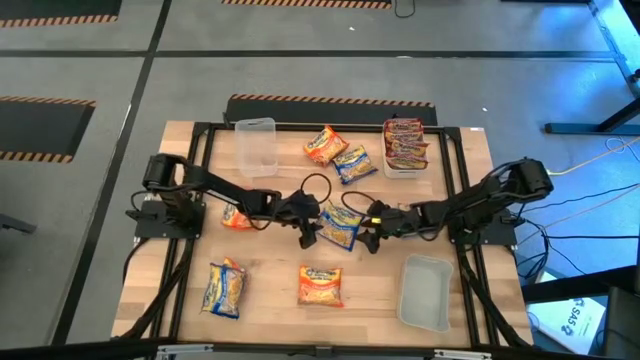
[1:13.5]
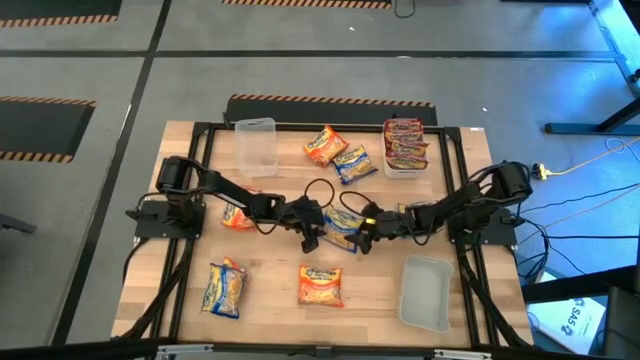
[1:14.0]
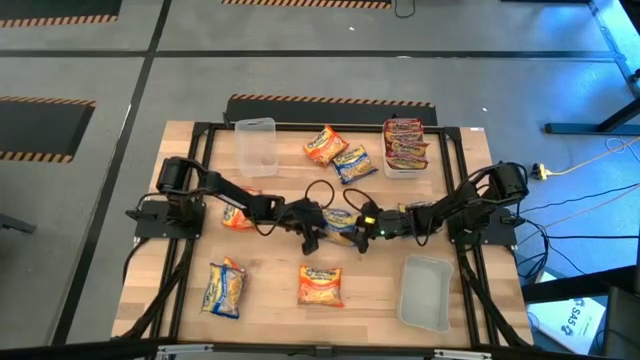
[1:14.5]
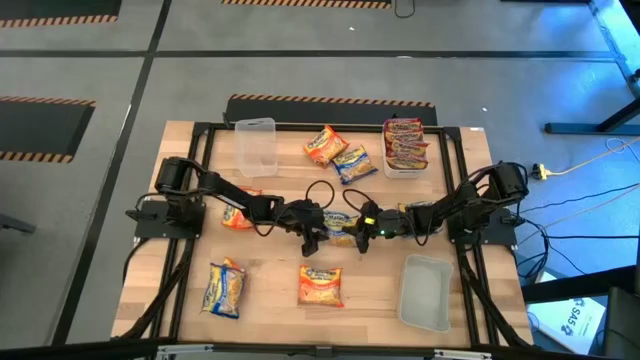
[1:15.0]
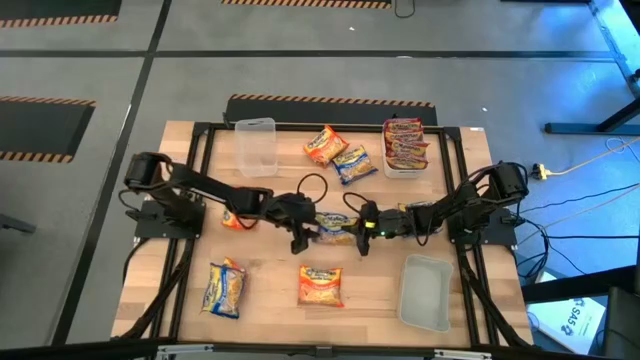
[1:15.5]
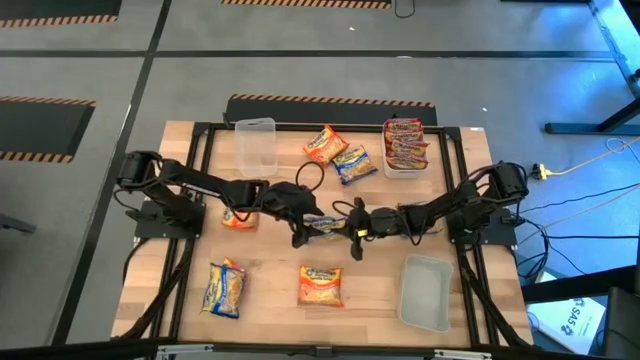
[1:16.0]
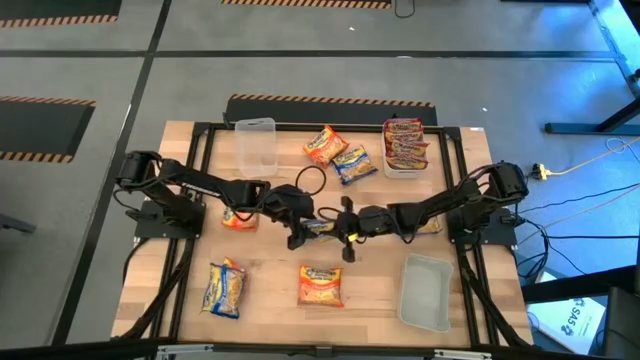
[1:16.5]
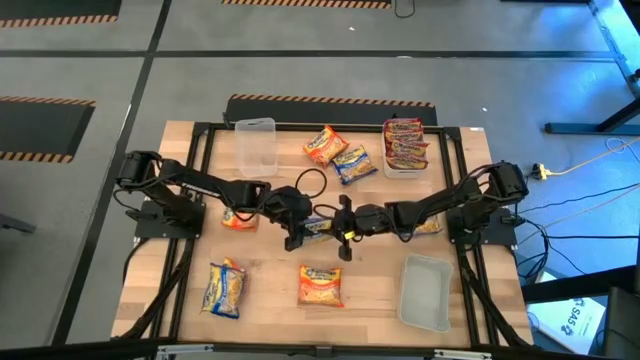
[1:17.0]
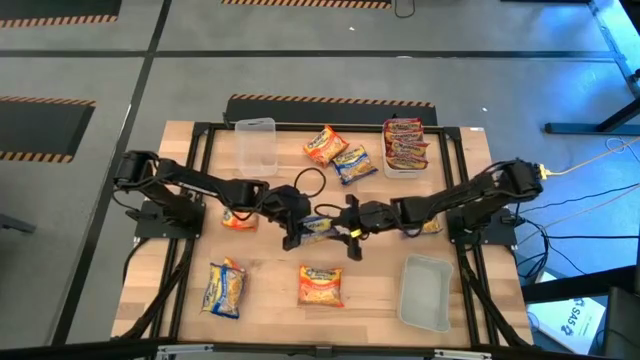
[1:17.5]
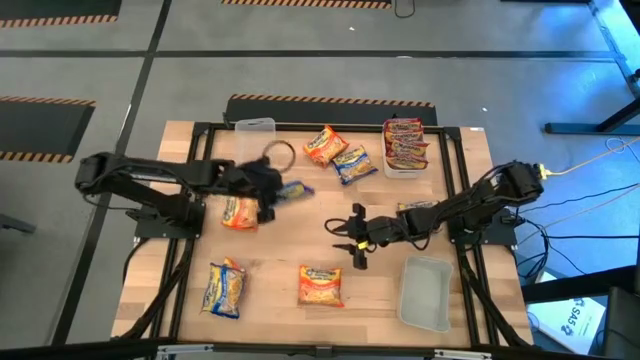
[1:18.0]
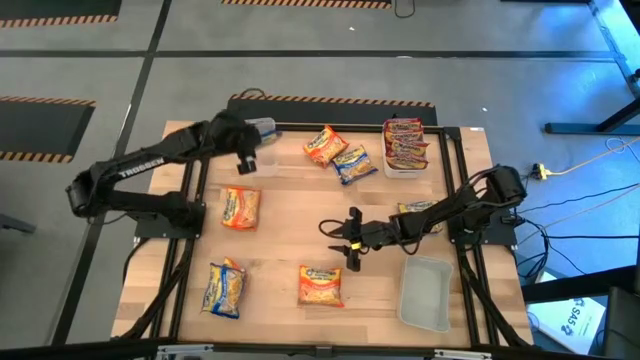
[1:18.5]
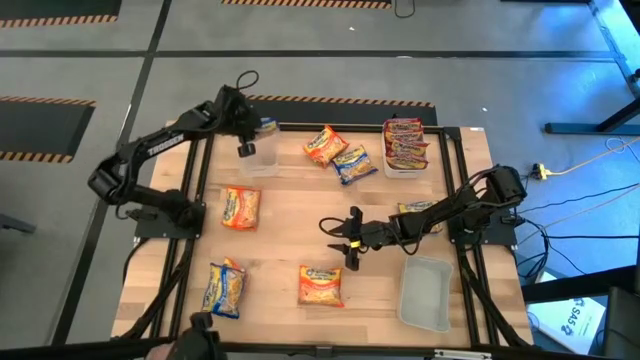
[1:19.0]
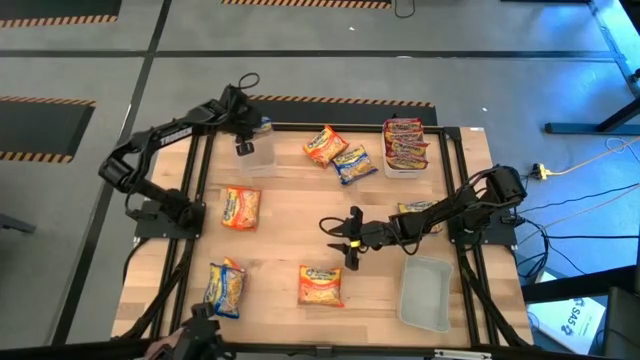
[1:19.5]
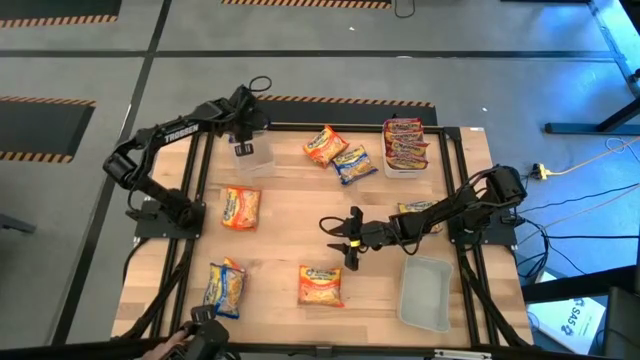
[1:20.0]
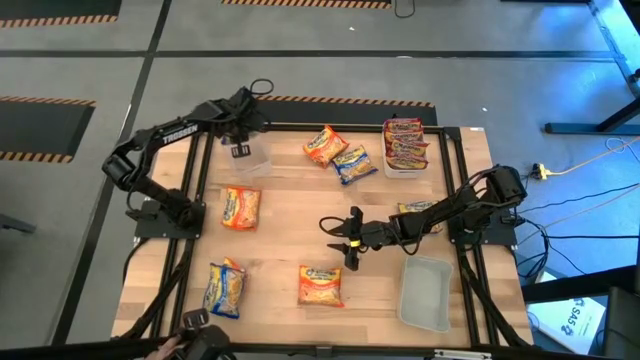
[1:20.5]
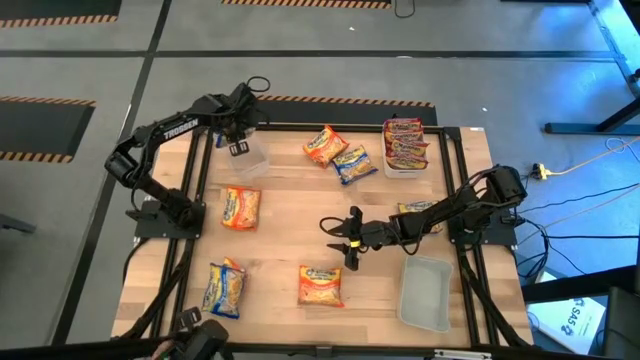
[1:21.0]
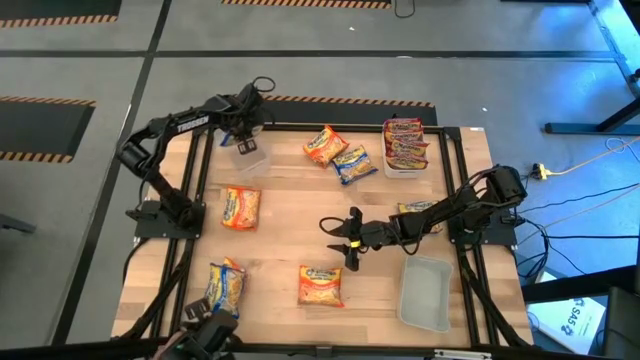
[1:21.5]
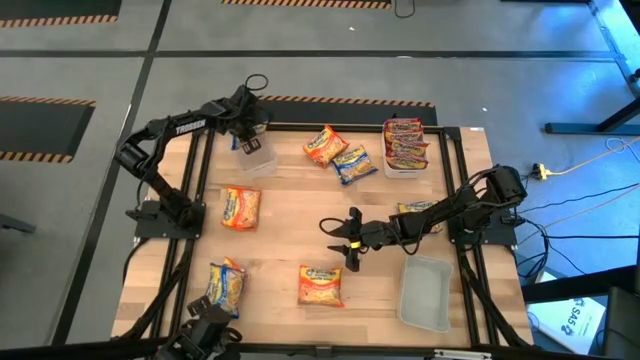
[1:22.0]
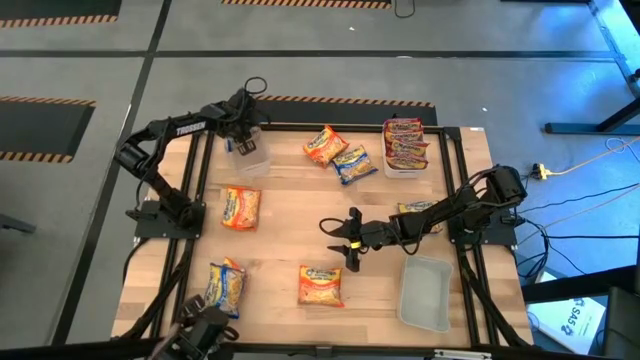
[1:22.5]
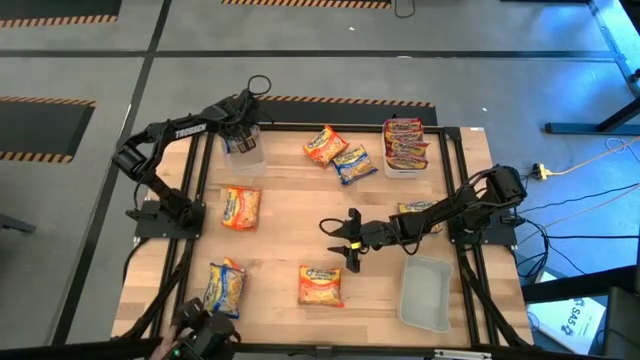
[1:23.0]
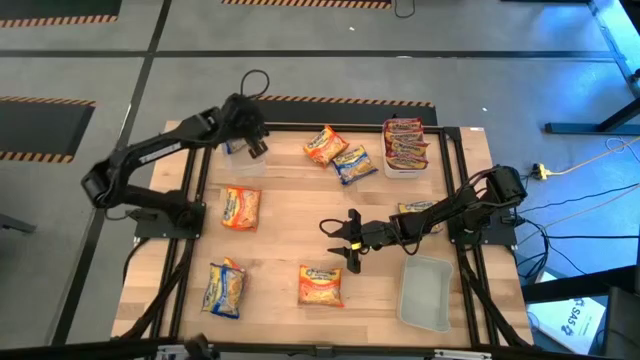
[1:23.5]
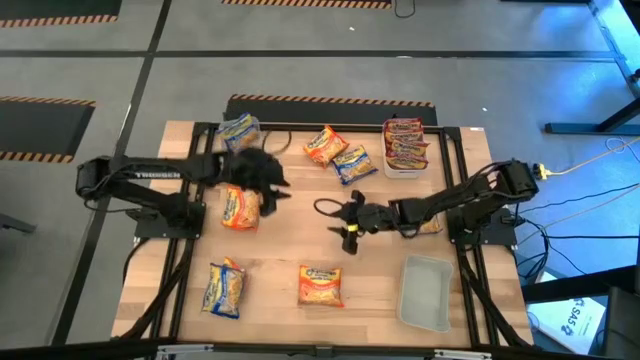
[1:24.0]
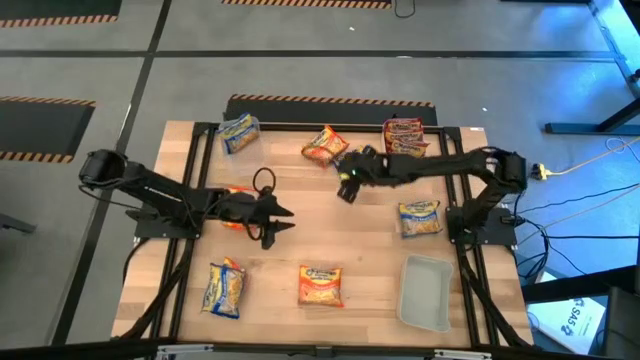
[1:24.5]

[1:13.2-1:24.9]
Task: Sort Maruchan noodles
Put the center left blue noodle pack into the transparent bin

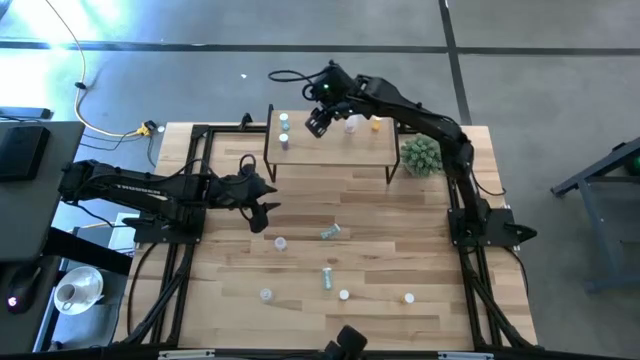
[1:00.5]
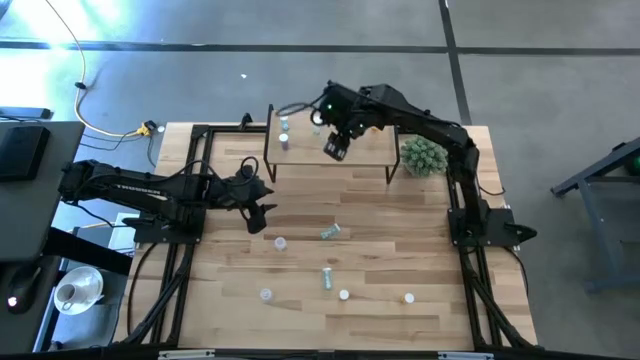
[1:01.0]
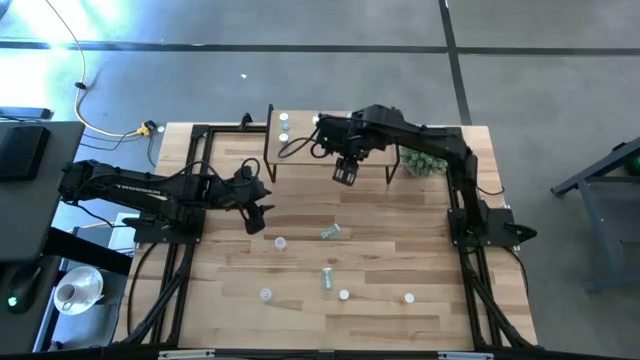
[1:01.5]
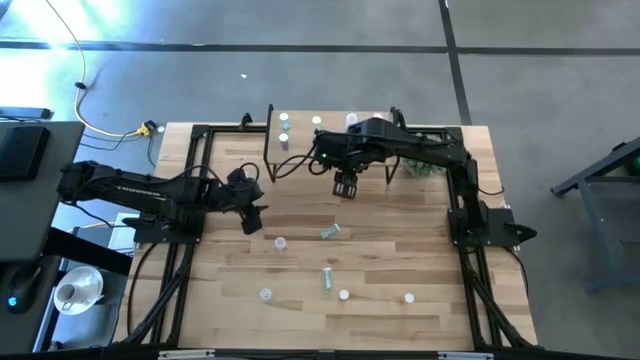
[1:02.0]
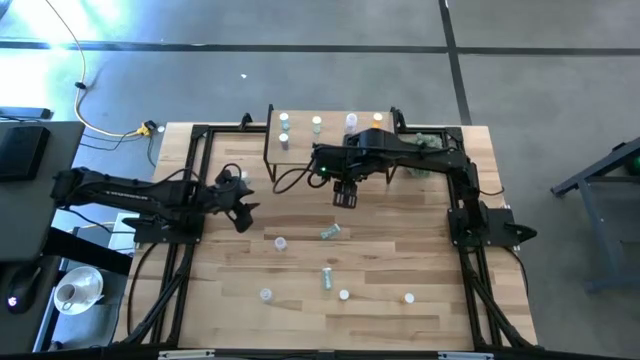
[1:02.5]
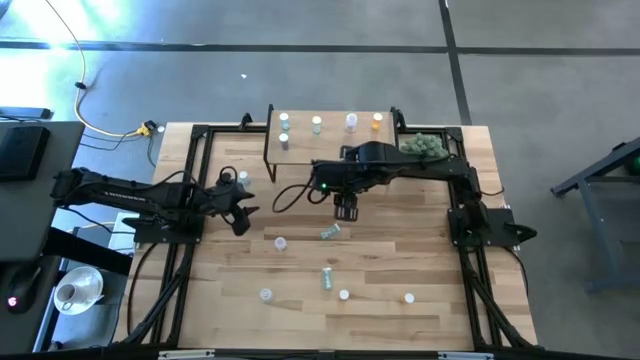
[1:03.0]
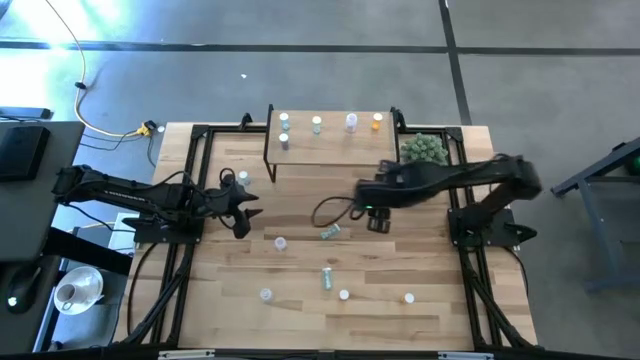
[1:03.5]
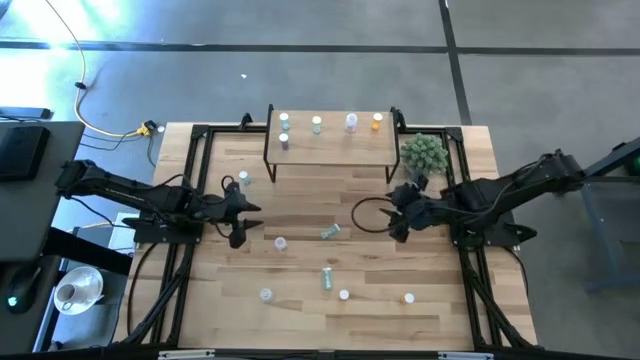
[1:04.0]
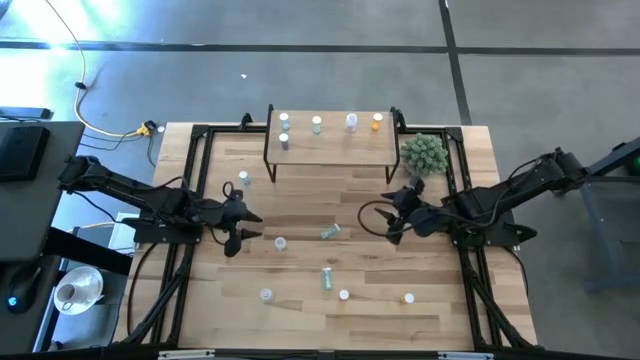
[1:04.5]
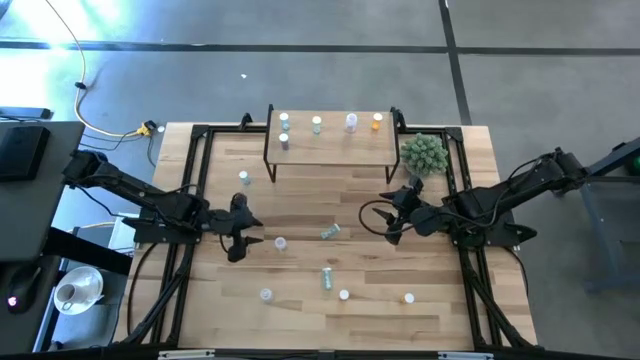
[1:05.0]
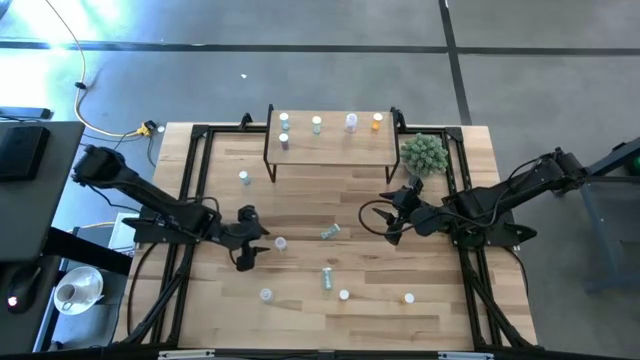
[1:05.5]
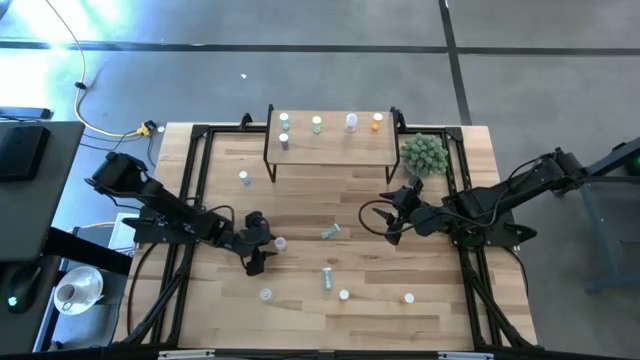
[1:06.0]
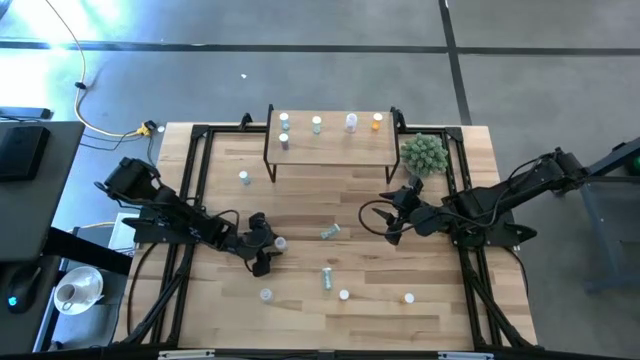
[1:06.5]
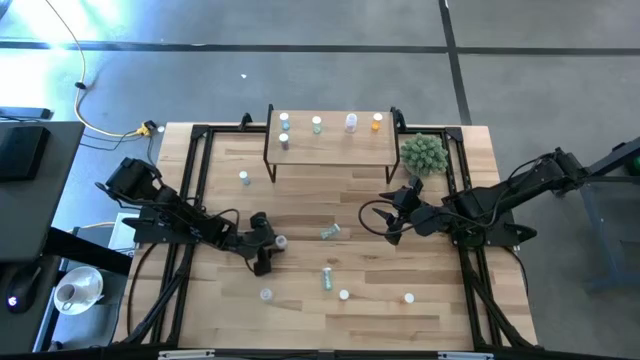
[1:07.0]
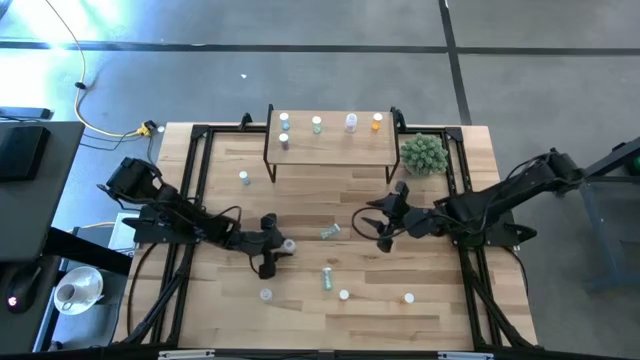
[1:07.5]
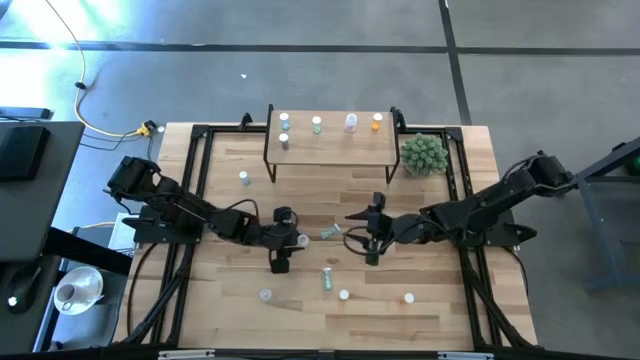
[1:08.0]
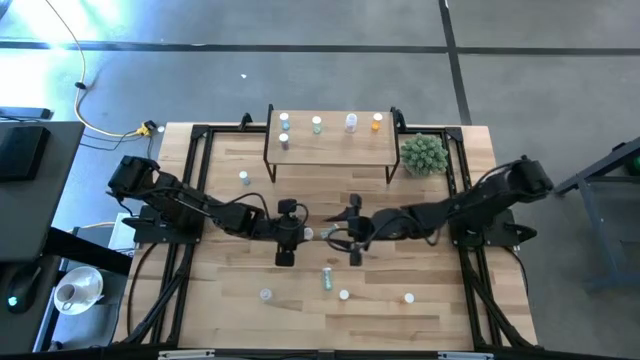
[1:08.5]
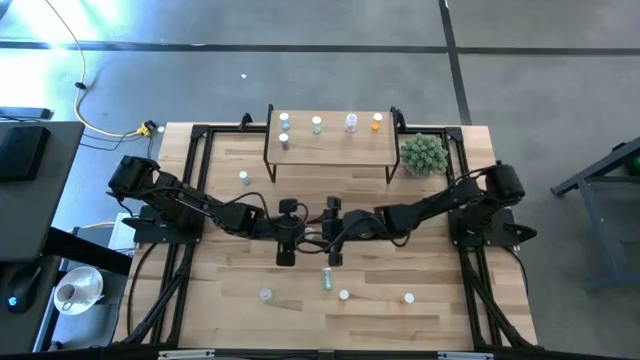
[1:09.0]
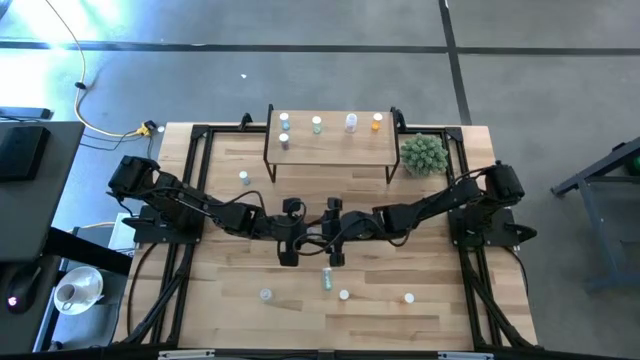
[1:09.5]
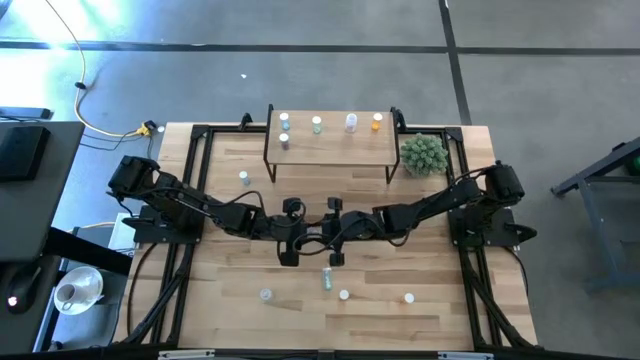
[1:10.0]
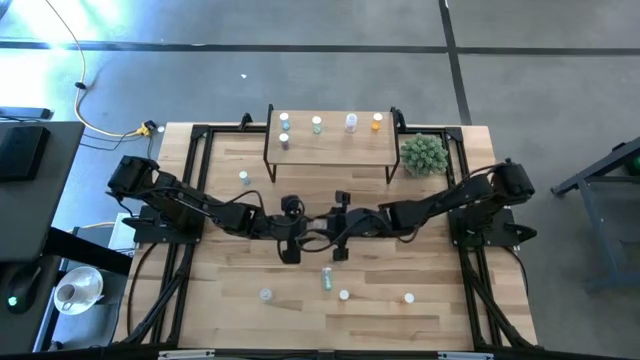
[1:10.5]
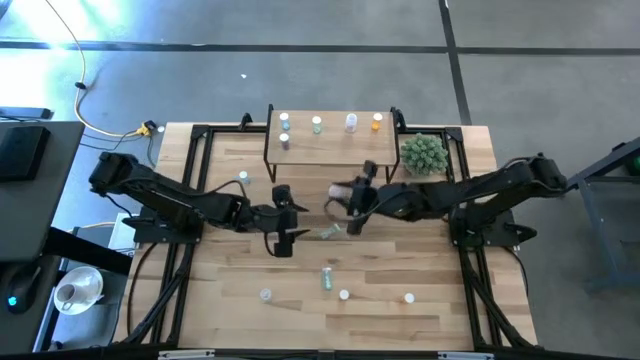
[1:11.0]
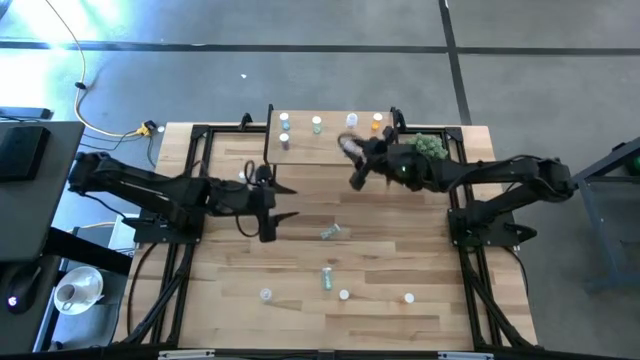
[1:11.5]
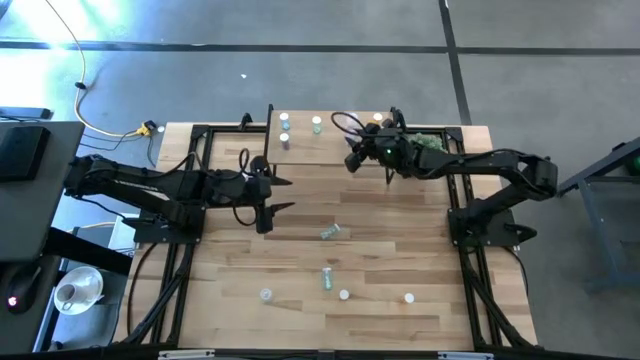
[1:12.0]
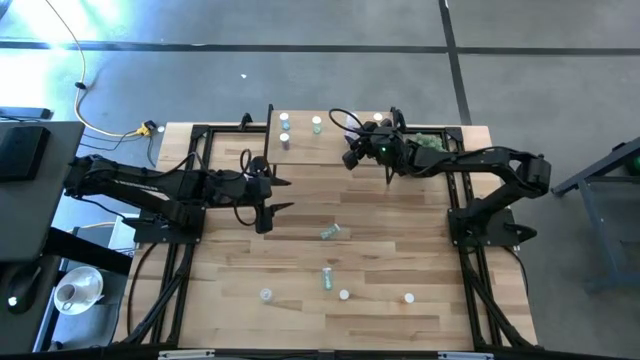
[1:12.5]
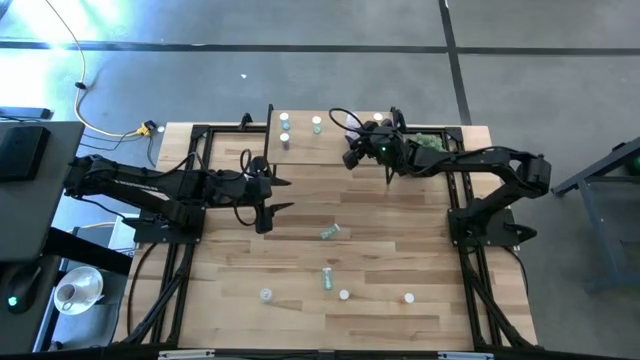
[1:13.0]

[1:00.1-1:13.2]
Task: Pick and place medicine bottles onto shelf by color
Put the top transparent pill bottle on the shelf aligned with the other transparent pill bottle
